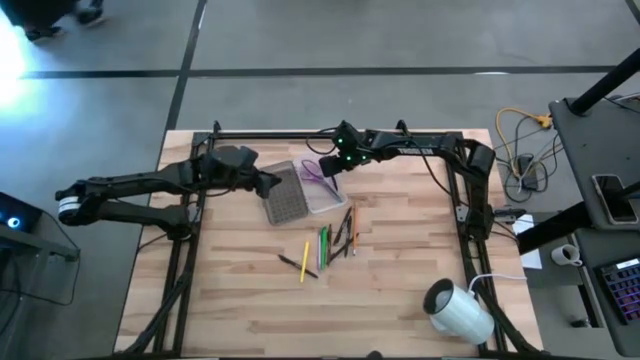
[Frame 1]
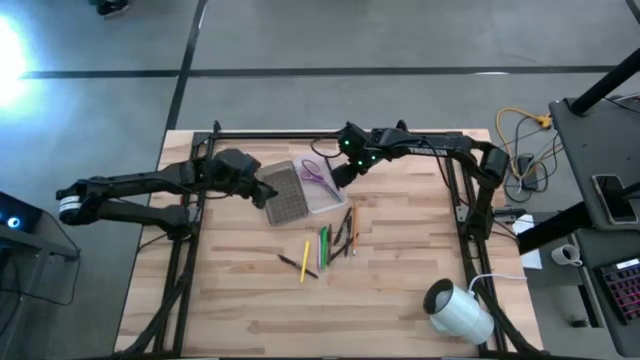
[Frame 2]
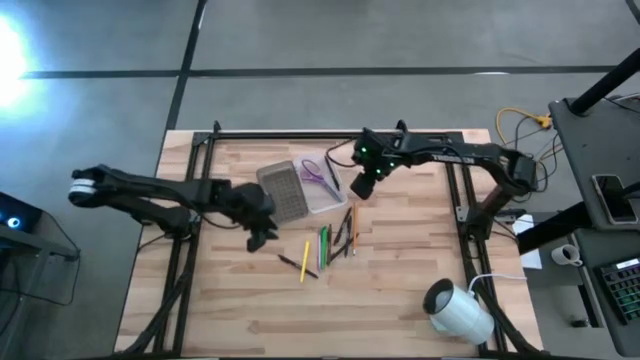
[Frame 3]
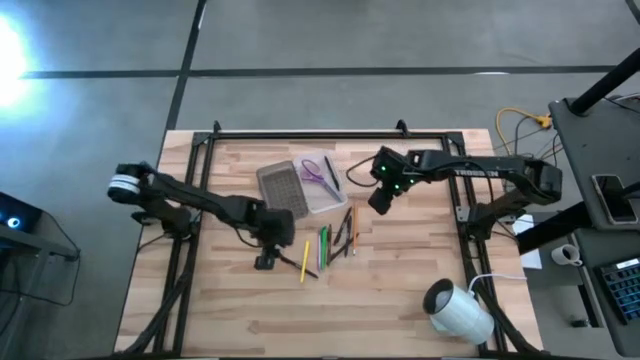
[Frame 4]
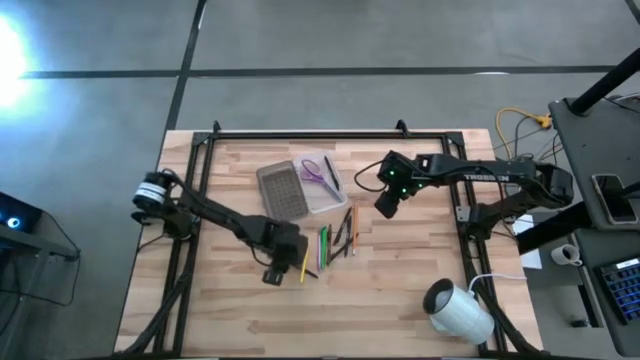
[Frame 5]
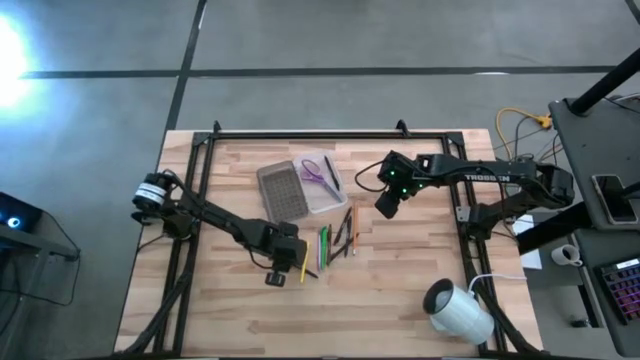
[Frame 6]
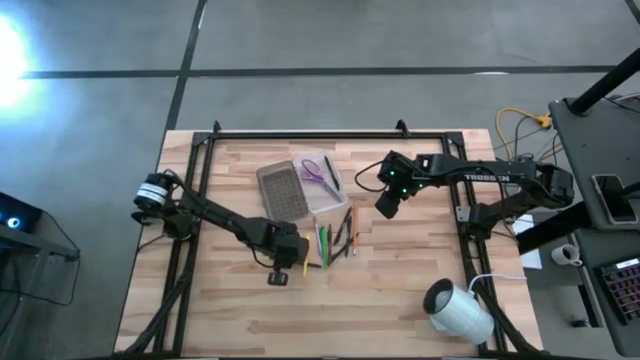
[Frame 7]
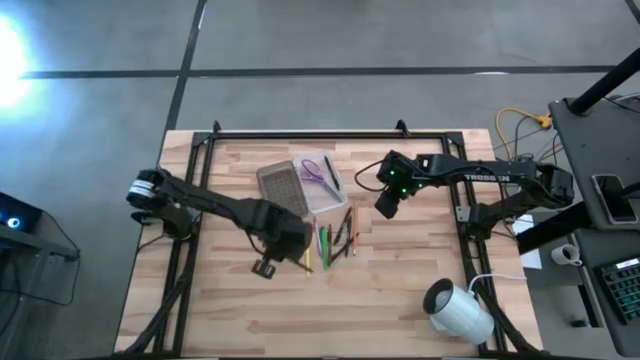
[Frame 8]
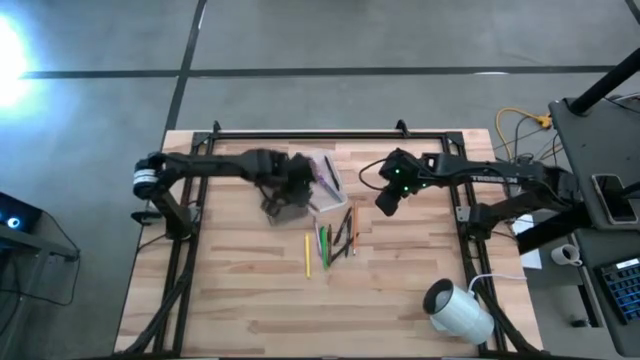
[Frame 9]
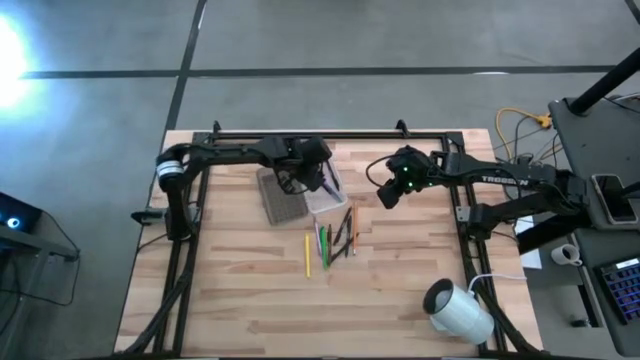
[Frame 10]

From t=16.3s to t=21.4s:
Task: Pick & place school supplies into a supply box
Put the black pen into the supply box

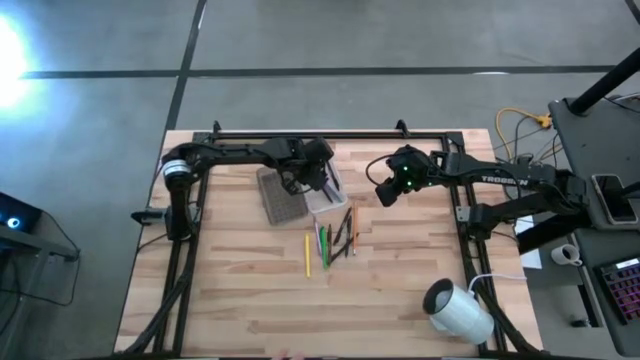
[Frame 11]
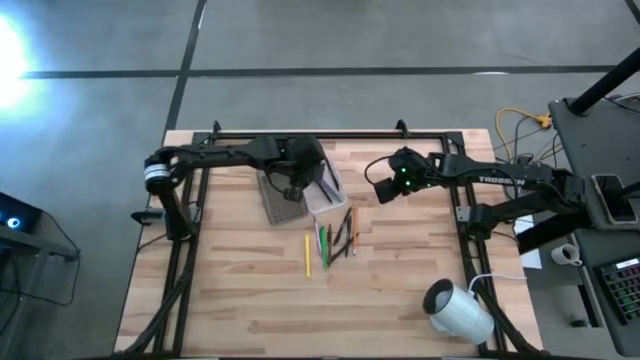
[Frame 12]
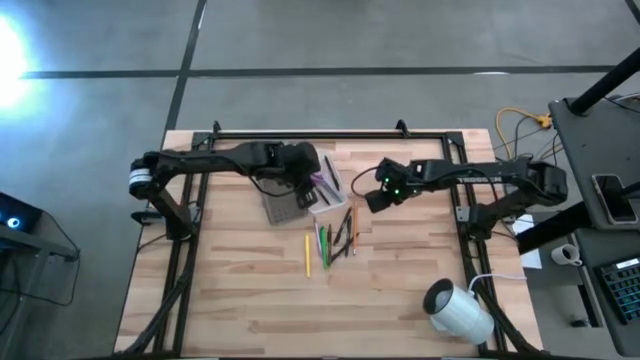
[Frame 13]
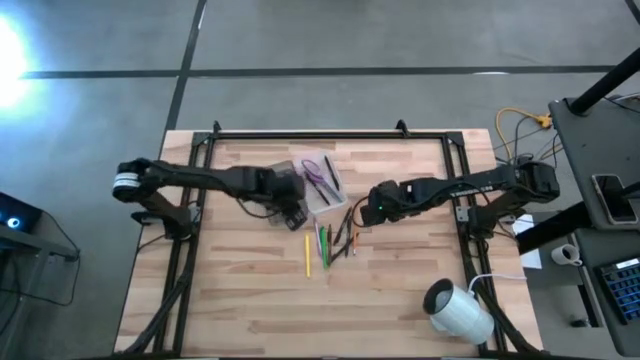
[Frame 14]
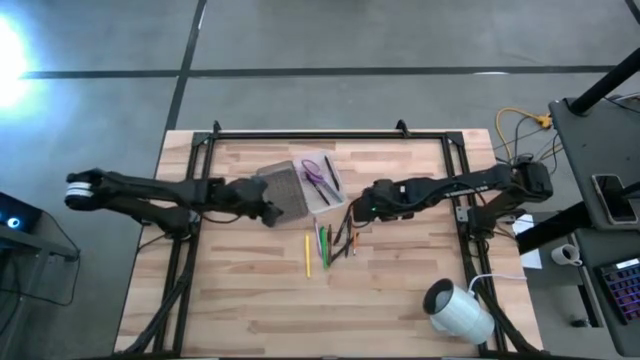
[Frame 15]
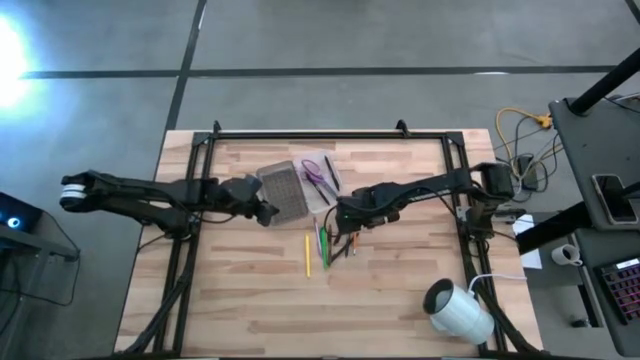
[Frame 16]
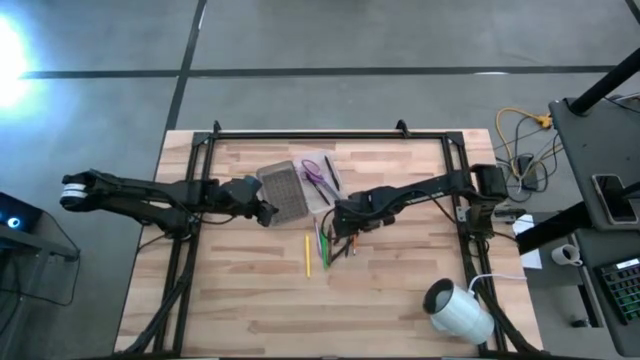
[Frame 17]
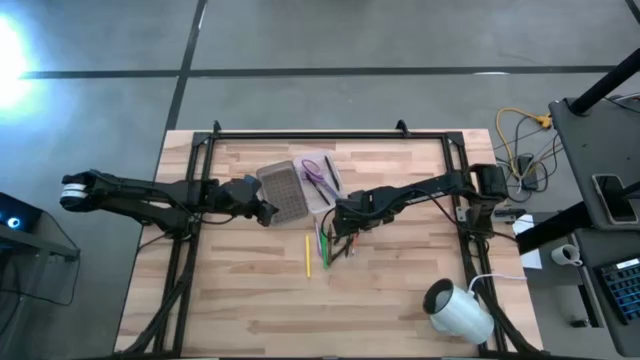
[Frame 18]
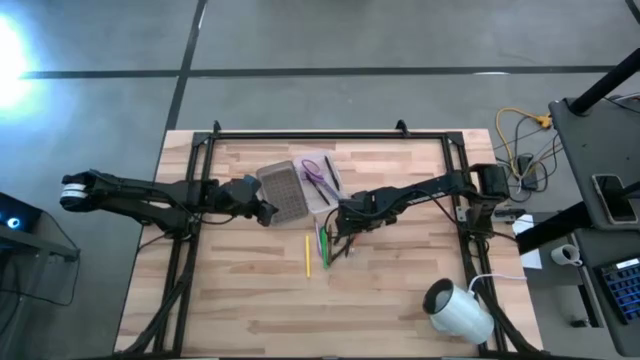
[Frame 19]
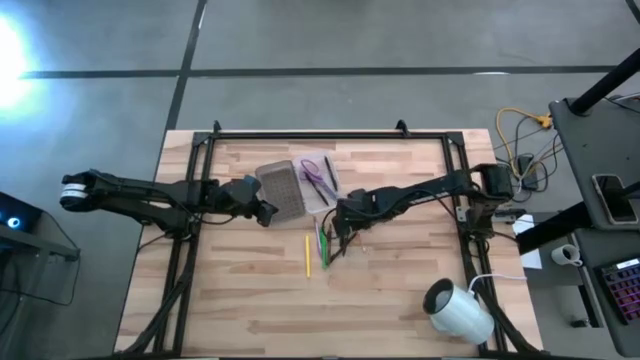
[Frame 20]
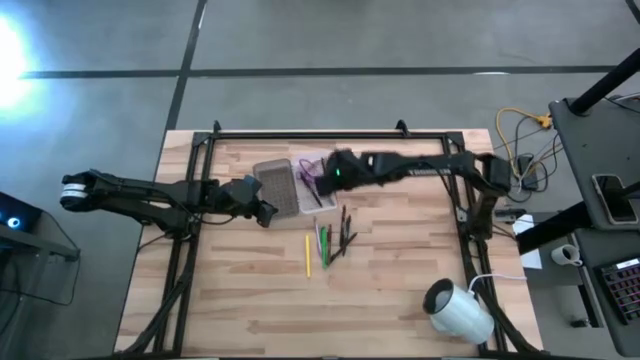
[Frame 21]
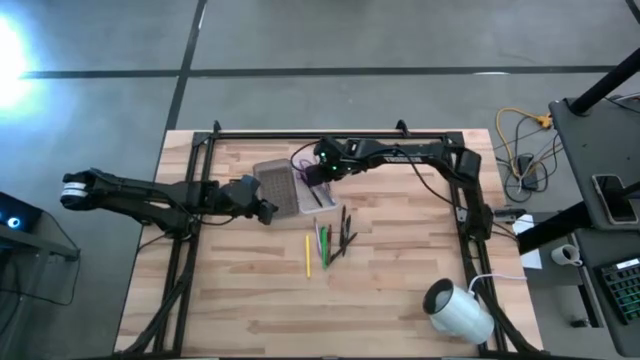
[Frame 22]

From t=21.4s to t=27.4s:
Put the orange pencil into the supply box

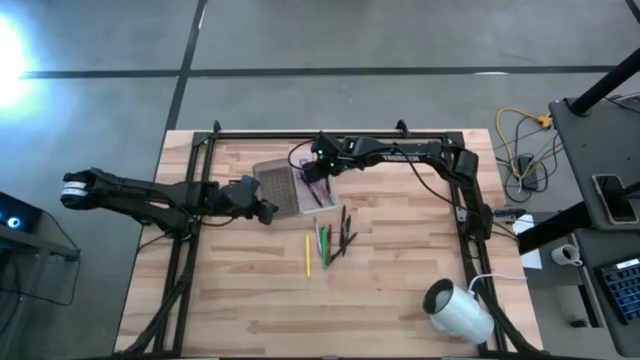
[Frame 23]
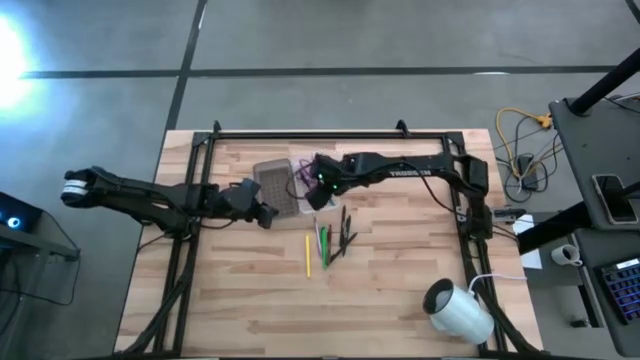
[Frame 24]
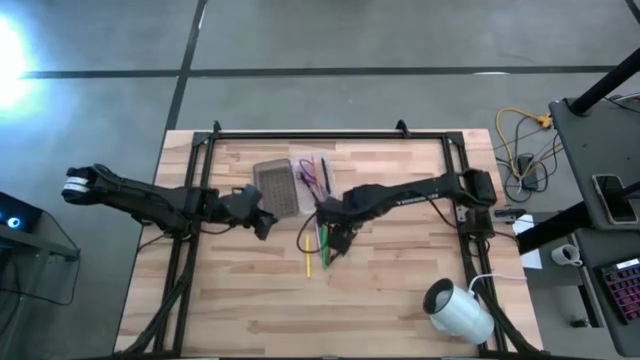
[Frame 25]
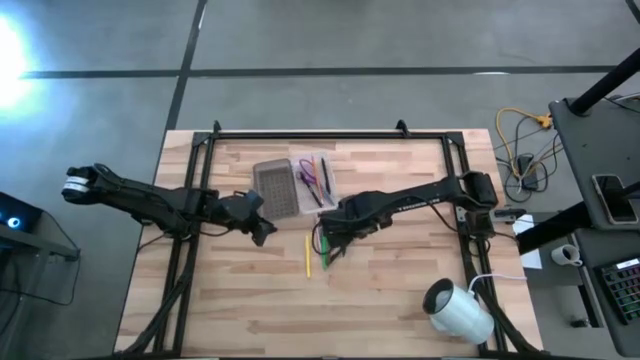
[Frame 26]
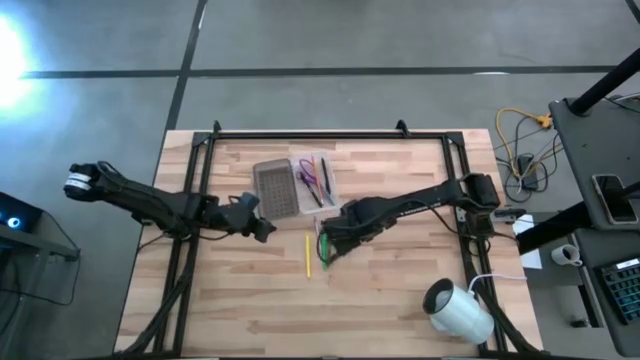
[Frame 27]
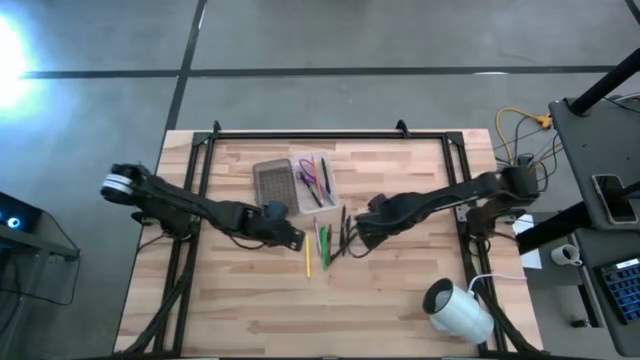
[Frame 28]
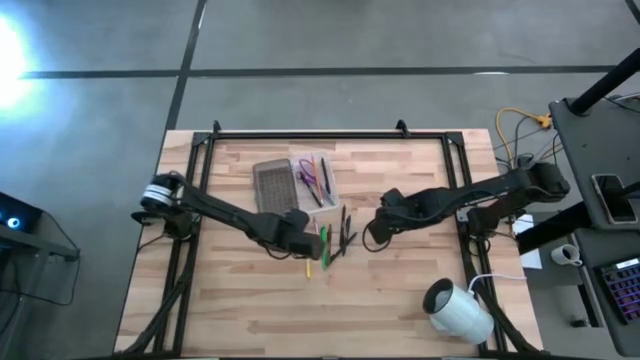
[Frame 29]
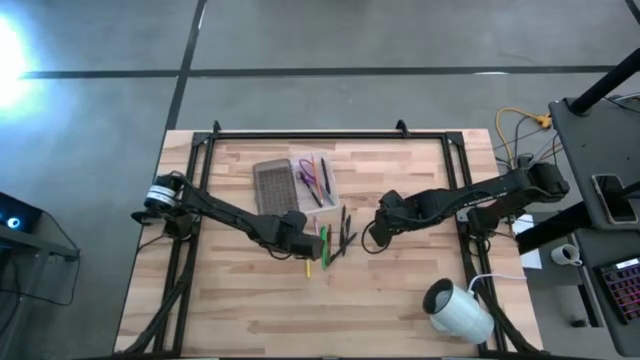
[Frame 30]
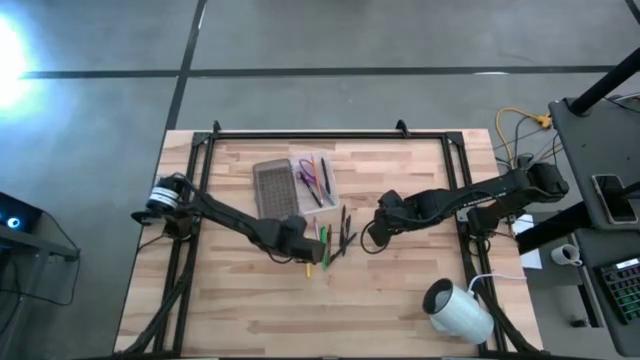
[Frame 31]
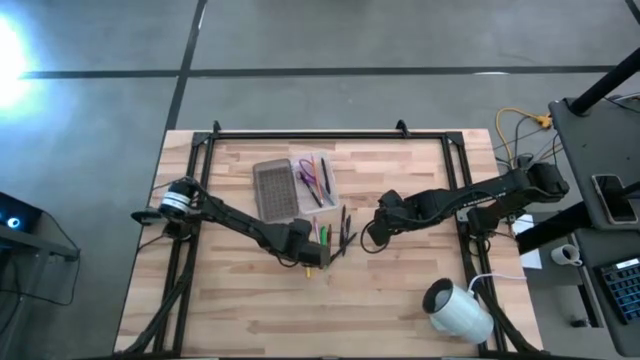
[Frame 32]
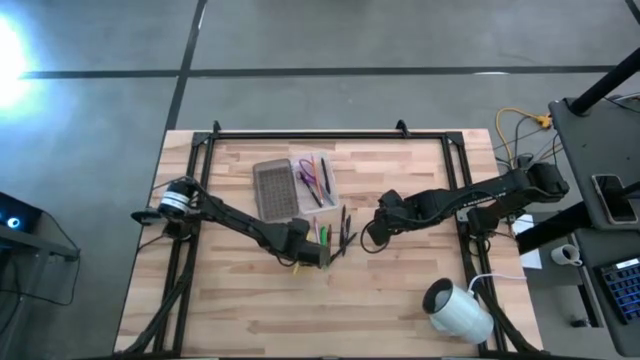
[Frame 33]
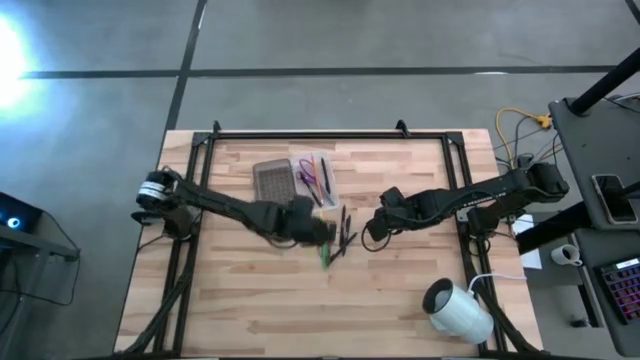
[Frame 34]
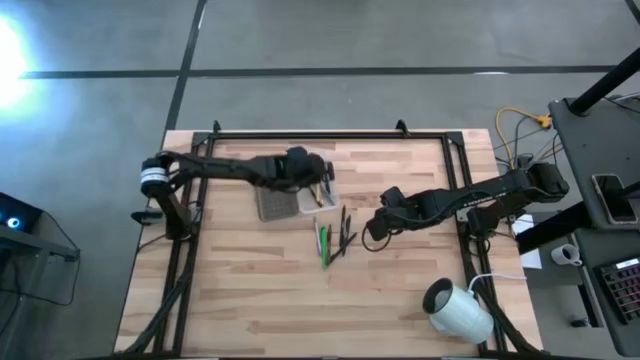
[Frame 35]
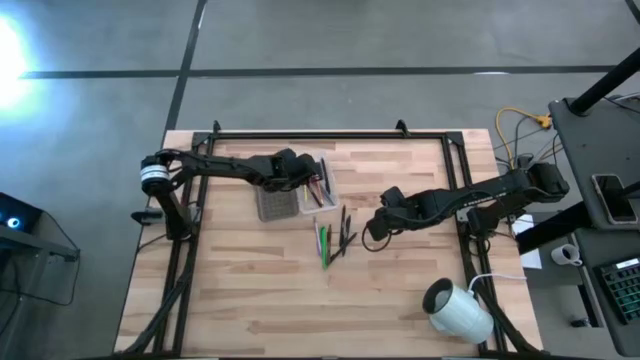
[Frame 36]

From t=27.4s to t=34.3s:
Put the yellow pen into the supply box

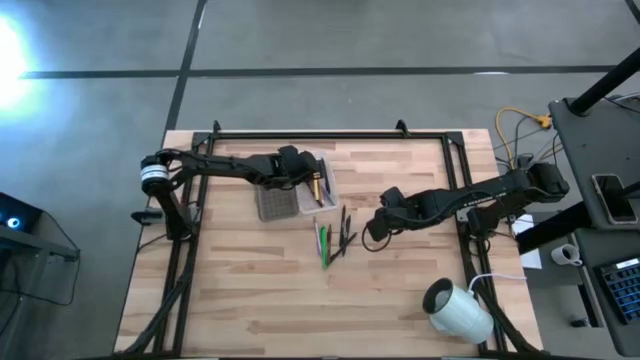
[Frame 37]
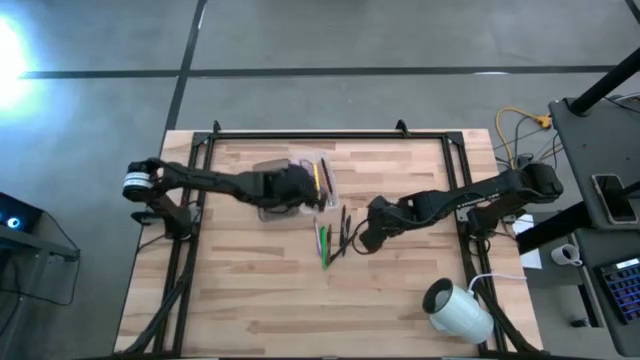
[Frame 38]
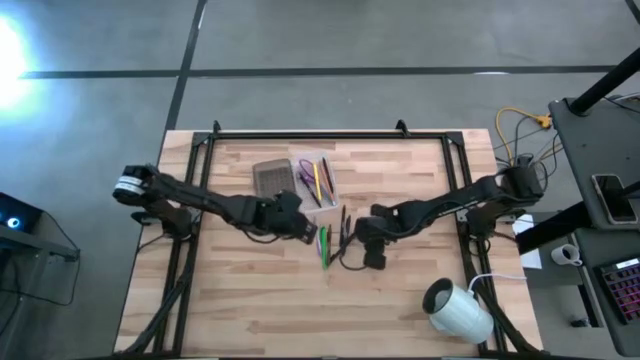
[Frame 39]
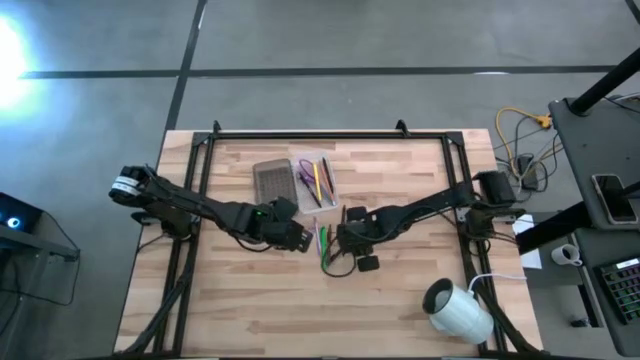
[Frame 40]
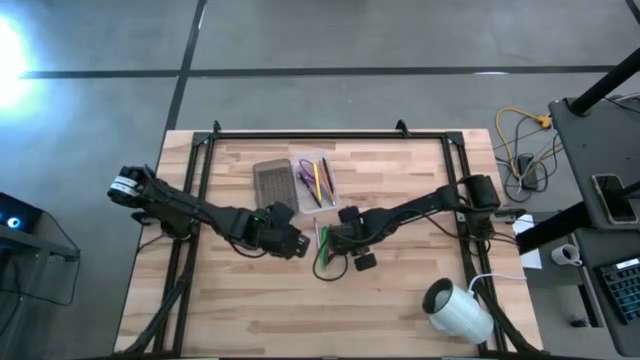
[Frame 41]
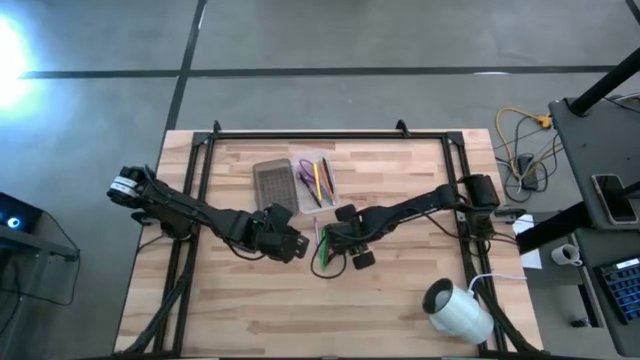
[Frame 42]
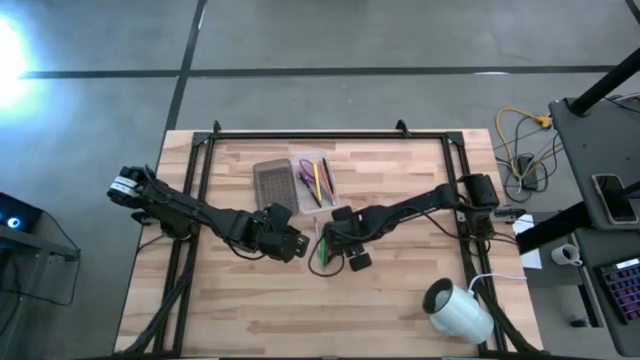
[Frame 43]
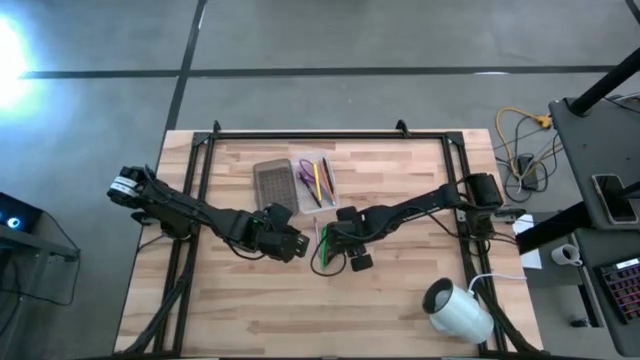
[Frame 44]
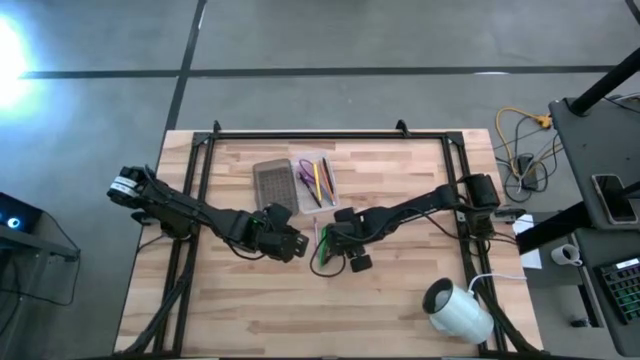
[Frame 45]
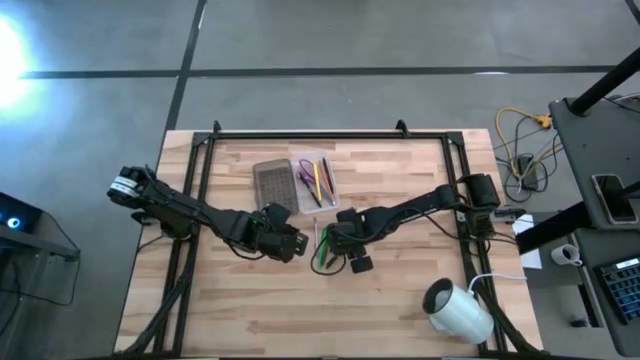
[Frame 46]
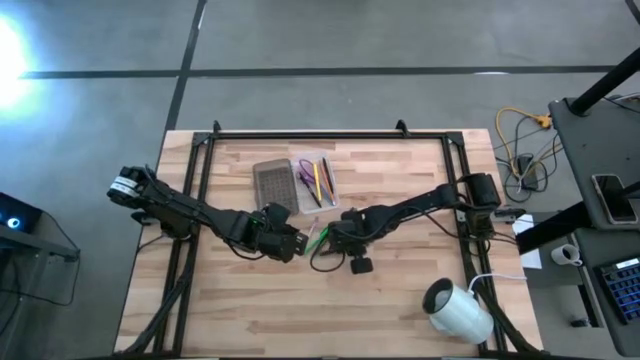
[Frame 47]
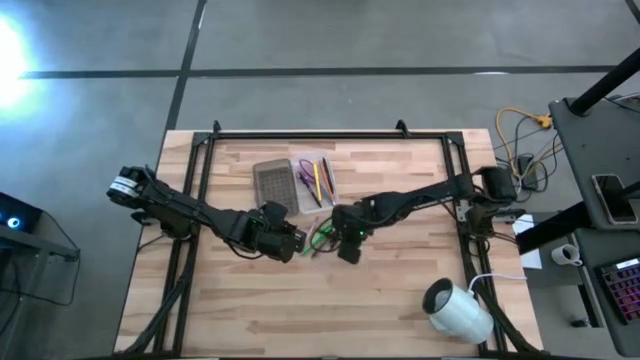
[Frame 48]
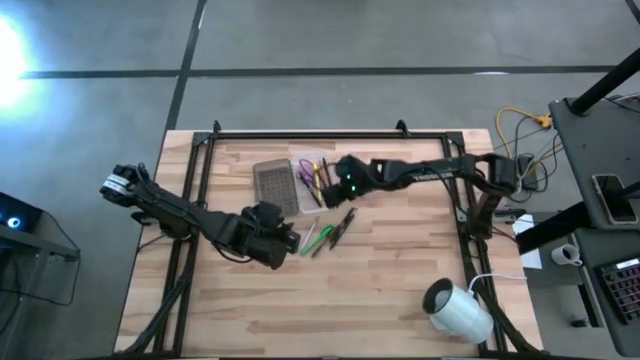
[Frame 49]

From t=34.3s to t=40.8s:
Put the black pen into the supply box
